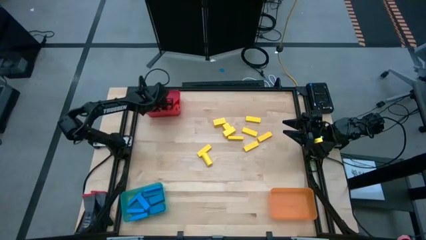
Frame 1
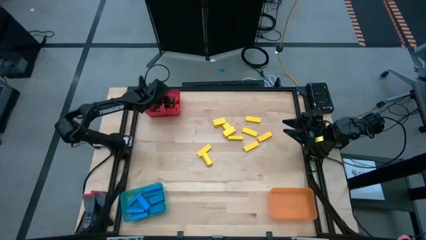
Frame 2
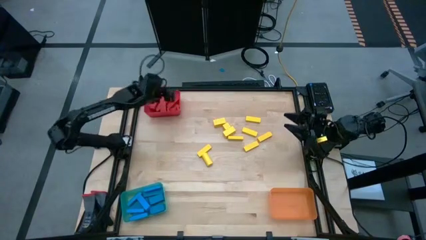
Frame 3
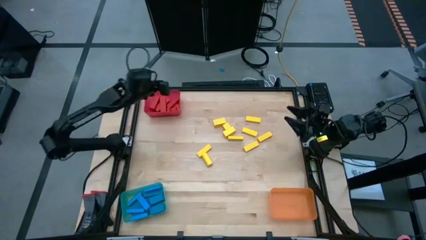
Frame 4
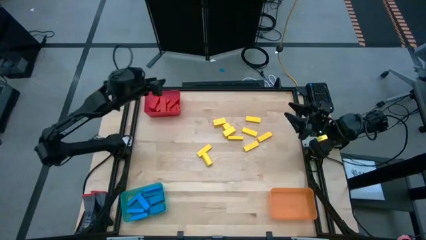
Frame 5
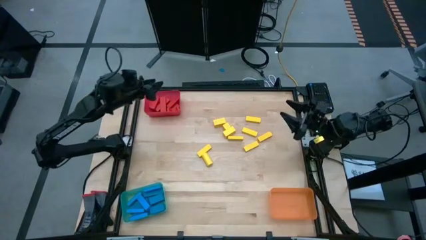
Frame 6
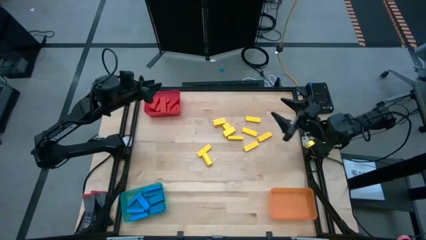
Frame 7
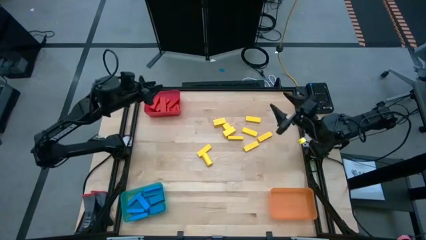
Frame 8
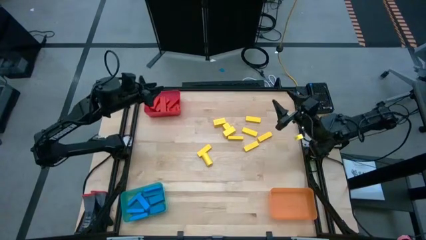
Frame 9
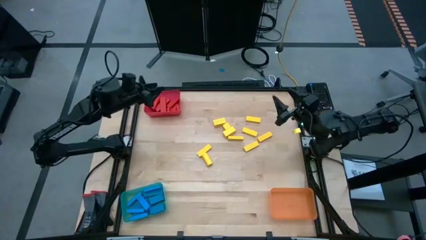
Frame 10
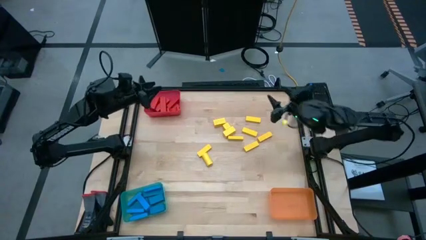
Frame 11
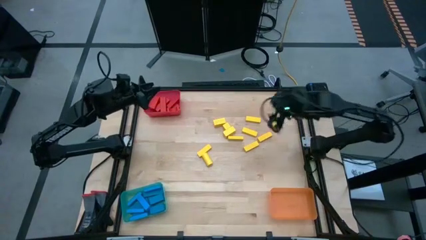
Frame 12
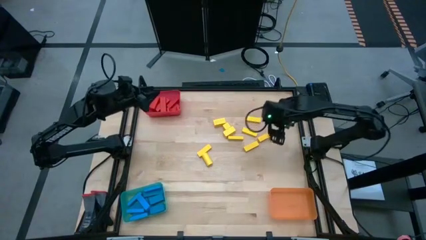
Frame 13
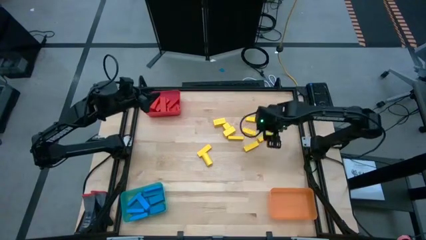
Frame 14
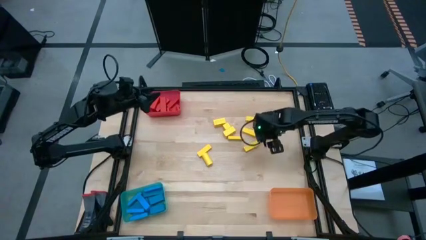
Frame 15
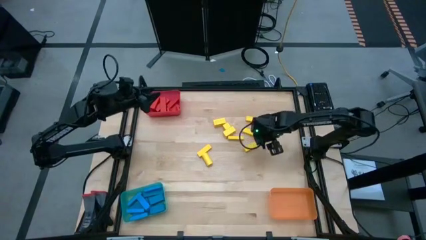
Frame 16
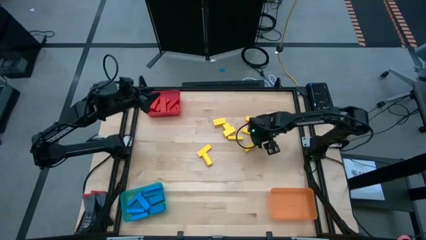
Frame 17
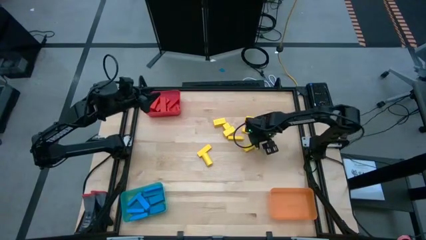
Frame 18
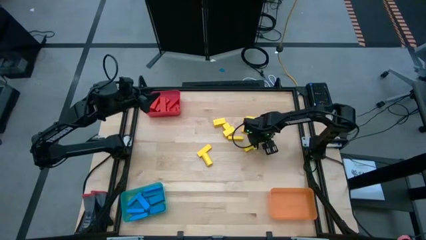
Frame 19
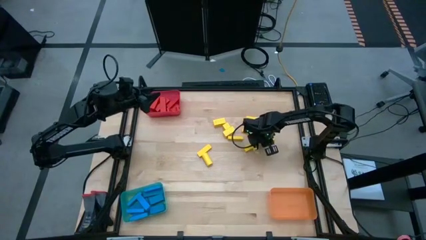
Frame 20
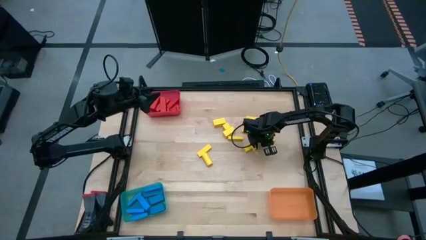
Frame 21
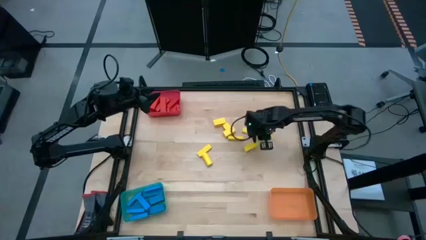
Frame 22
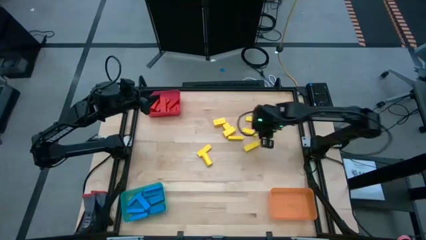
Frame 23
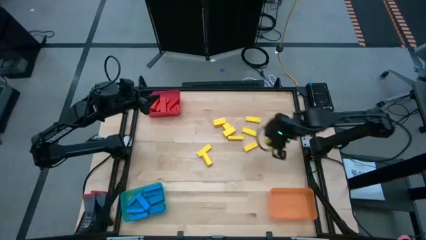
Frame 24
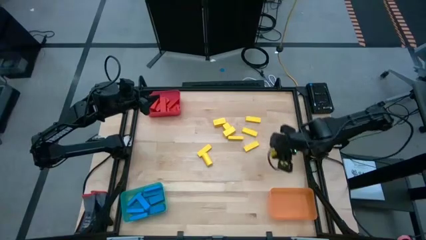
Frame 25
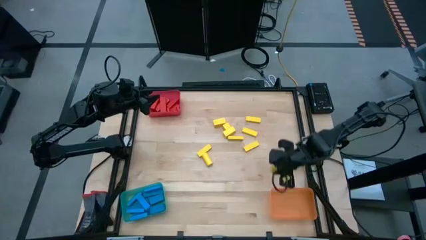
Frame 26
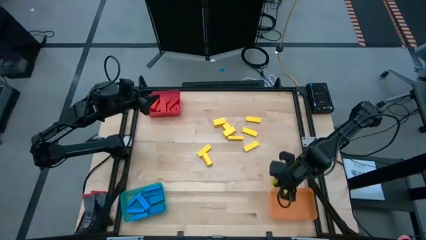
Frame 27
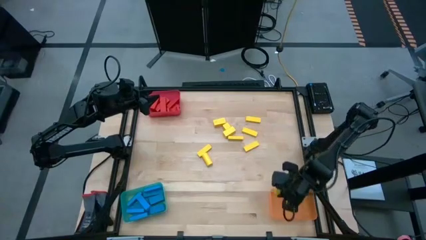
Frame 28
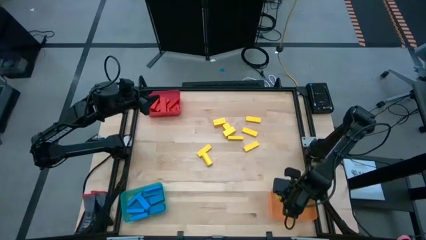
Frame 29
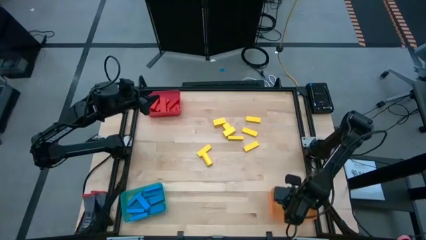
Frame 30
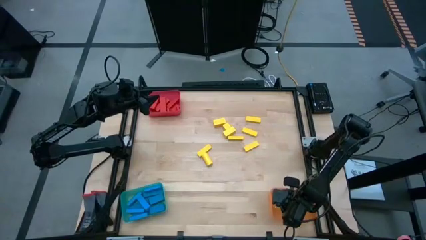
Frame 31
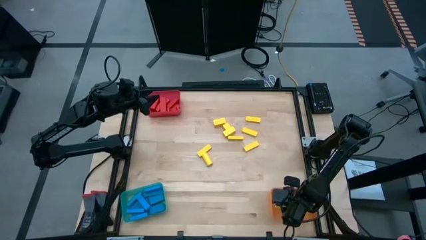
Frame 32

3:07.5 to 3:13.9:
Task: Sort blocks
Put the yellow block into the orange bin

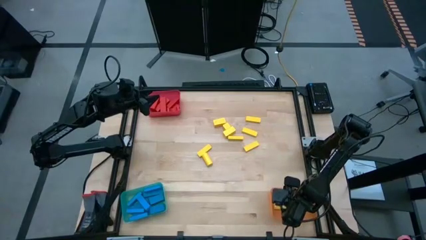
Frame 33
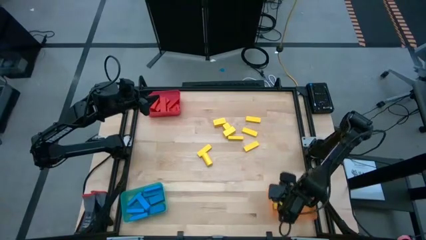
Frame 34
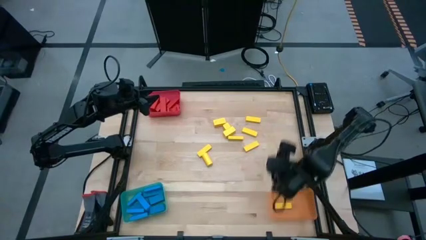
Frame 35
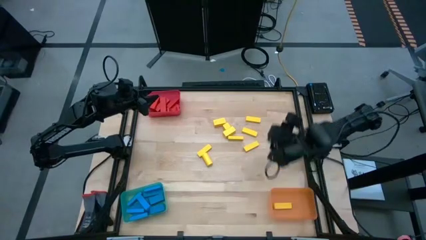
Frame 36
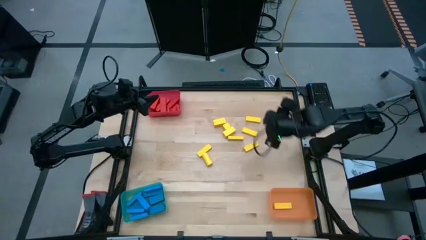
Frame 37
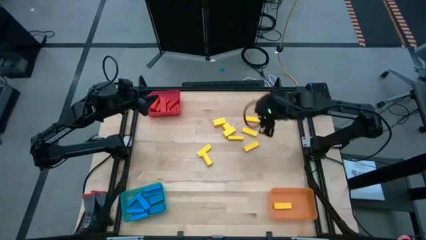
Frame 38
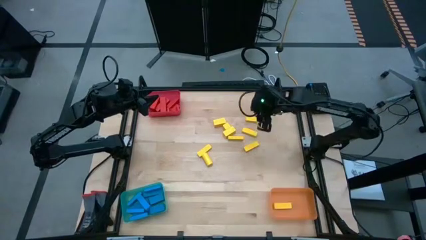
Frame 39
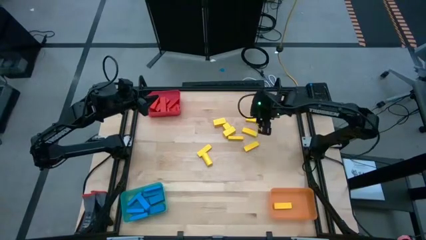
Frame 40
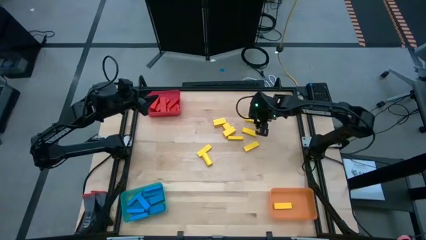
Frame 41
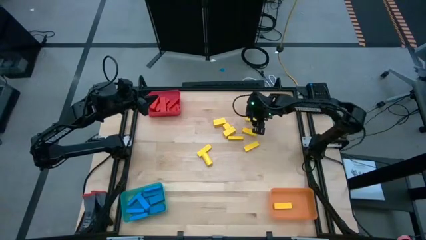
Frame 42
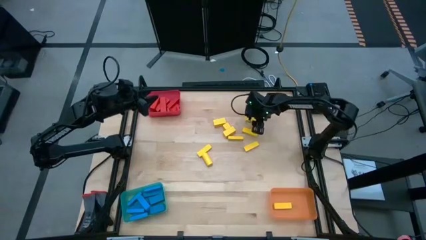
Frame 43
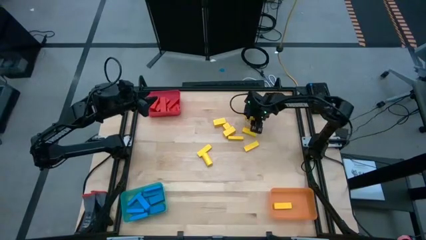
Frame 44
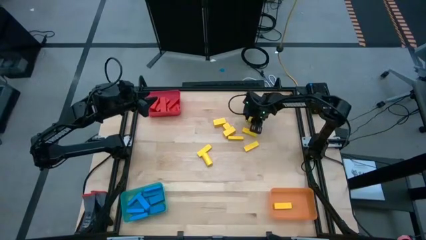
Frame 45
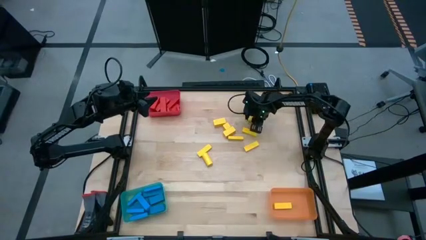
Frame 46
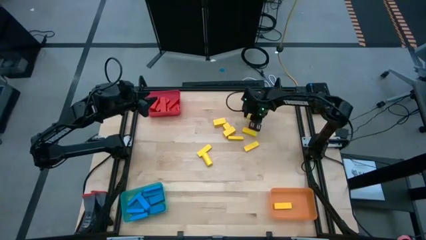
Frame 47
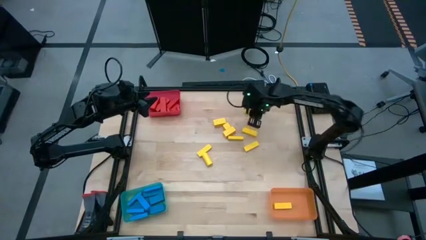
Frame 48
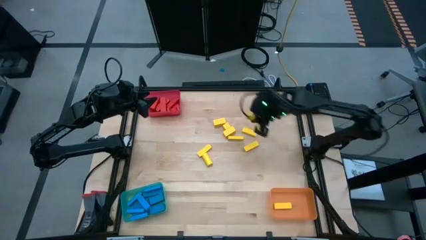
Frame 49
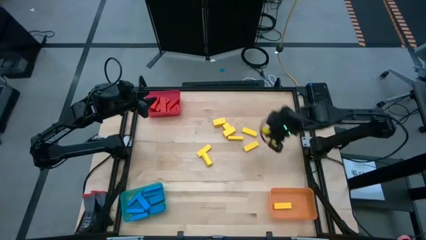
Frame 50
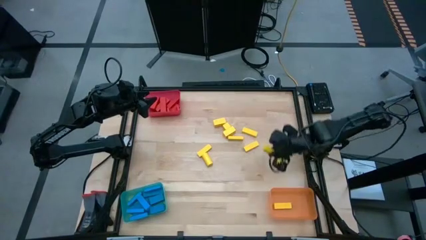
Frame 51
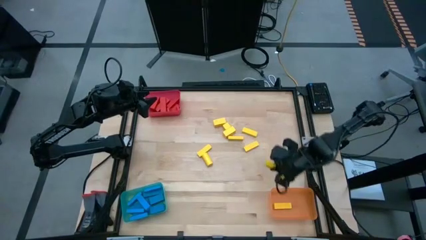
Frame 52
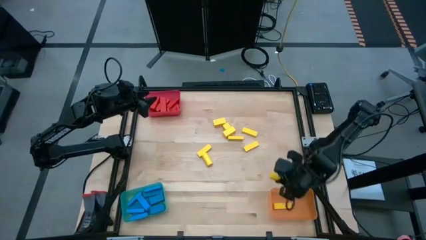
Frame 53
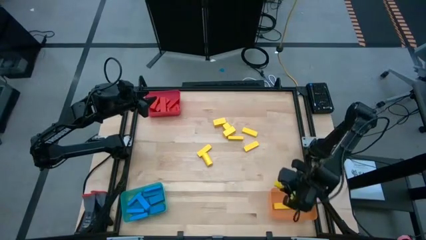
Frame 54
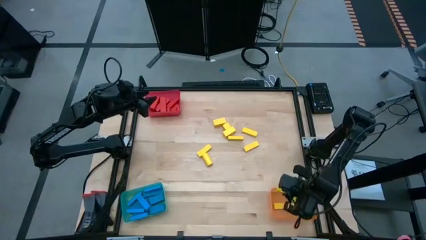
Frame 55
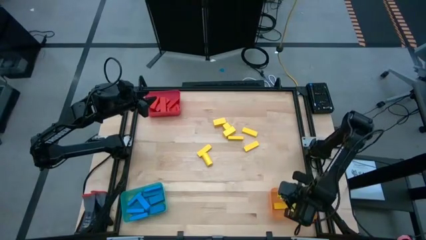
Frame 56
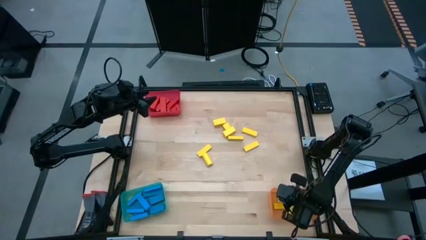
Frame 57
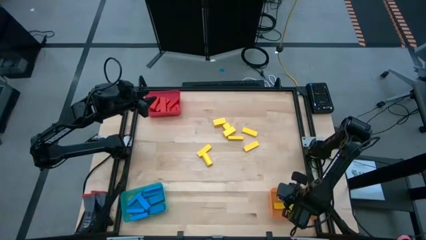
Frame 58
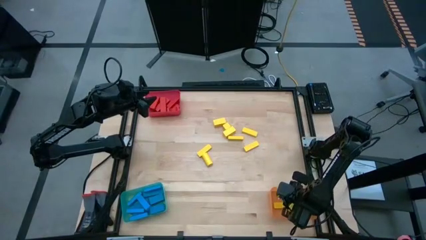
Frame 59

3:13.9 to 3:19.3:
Put the yellow block into the orange bin

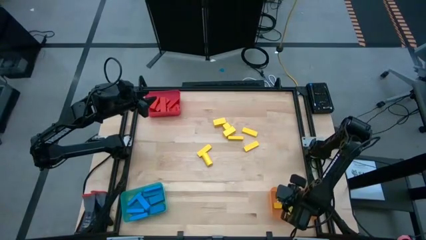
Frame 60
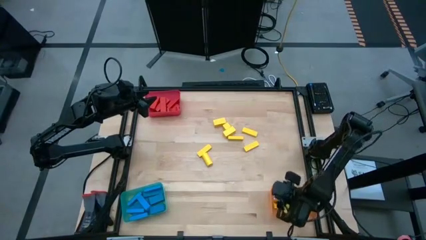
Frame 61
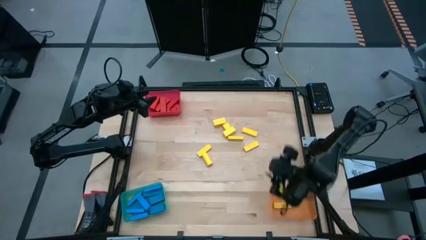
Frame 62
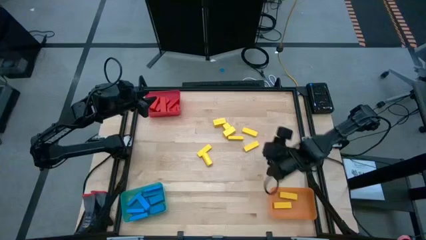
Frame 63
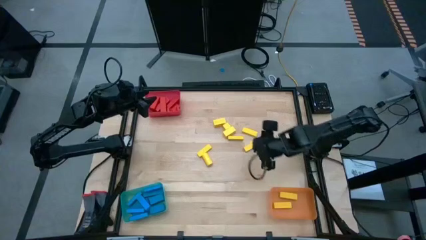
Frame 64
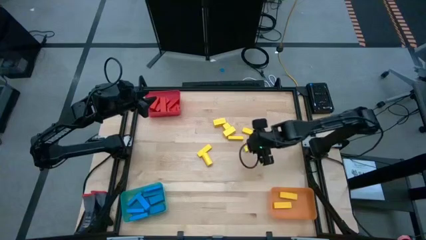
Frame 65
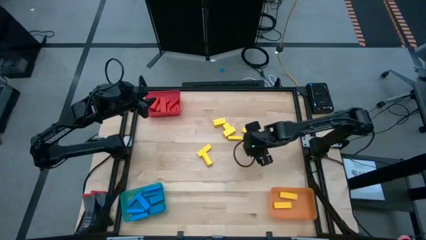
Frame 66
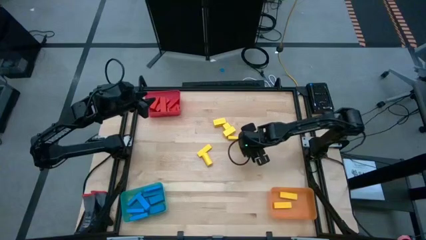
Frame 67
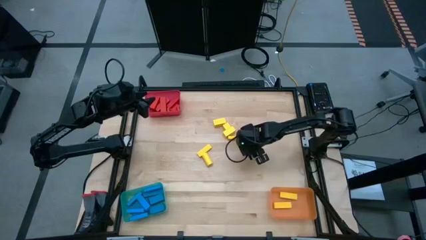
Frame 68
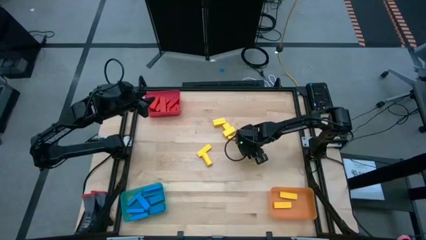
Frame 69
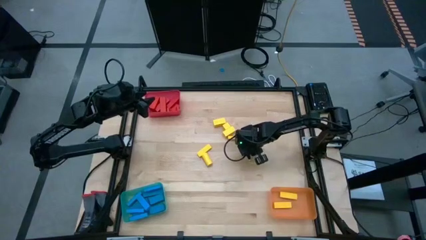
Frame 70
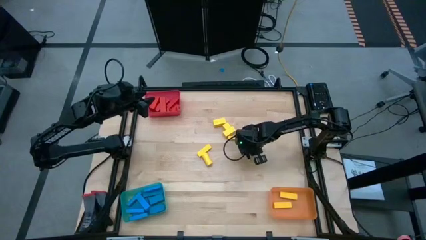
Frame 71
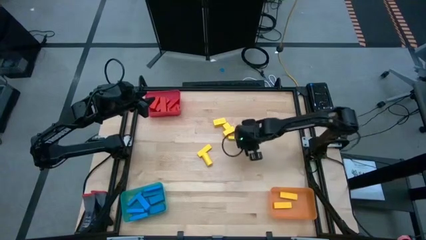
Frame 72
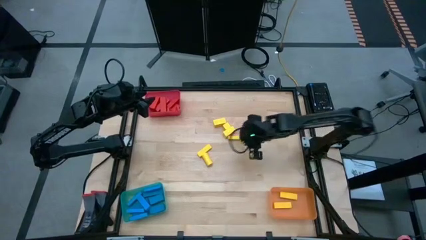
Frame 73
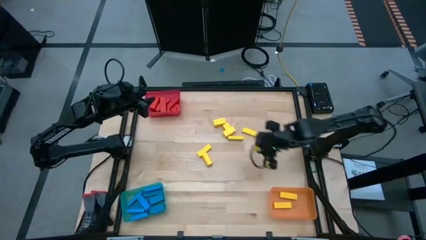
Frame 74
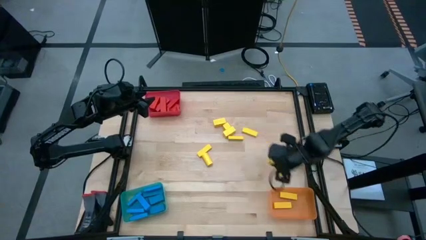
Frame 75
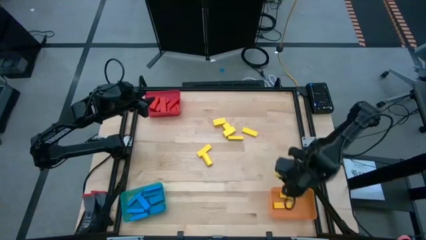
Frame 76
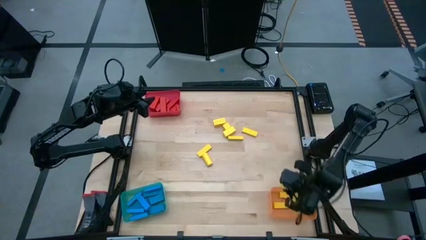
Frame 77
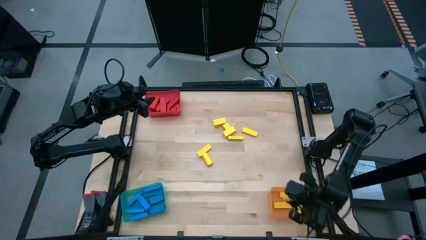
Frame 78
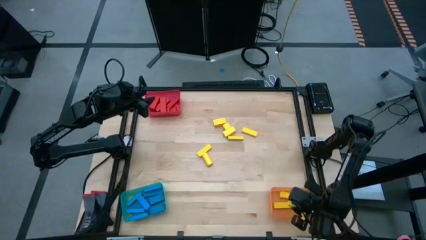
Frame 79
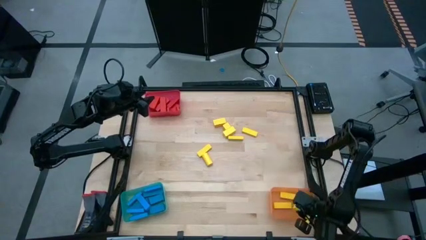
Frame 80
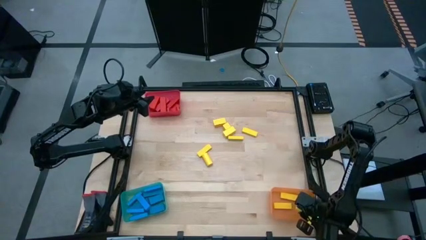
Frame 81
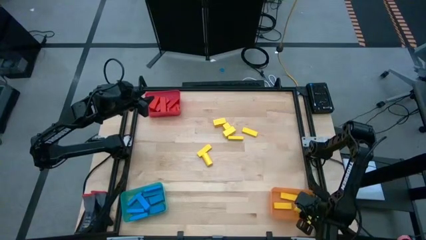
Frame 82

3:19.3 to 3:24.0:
Put the yellow block into the orange bin
